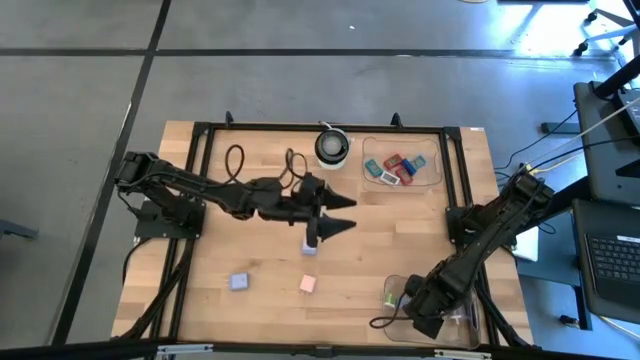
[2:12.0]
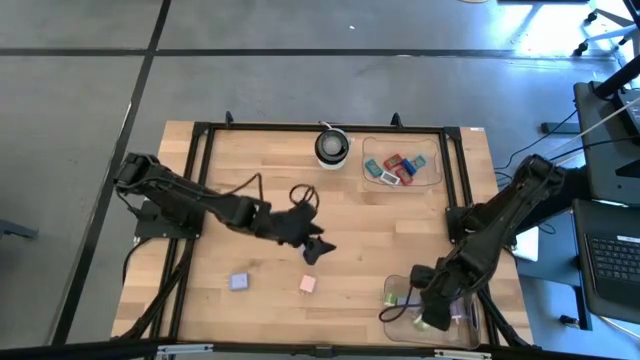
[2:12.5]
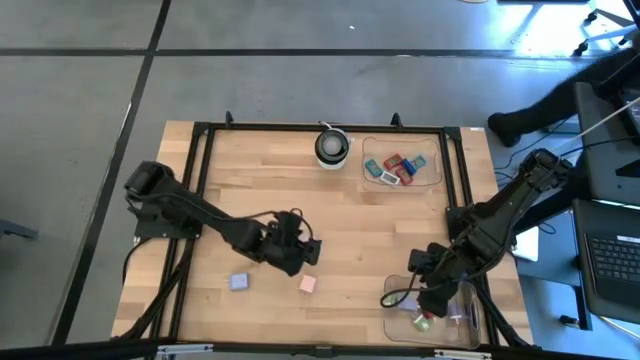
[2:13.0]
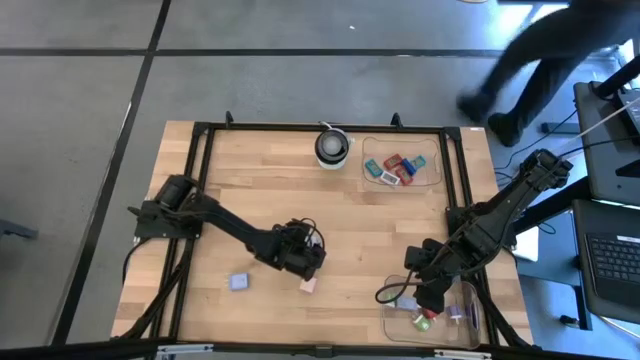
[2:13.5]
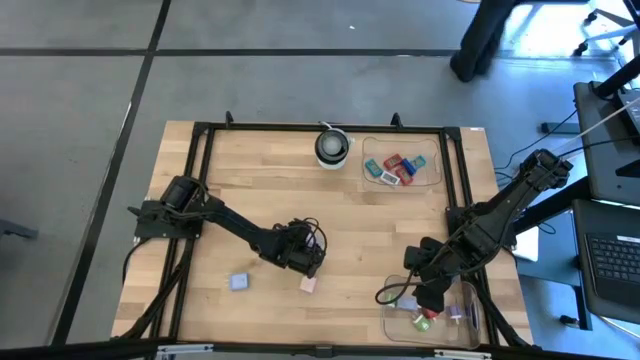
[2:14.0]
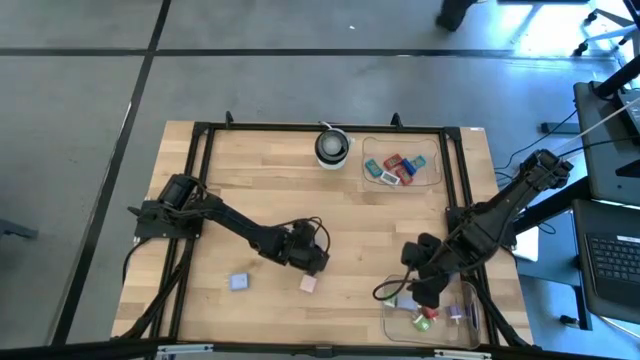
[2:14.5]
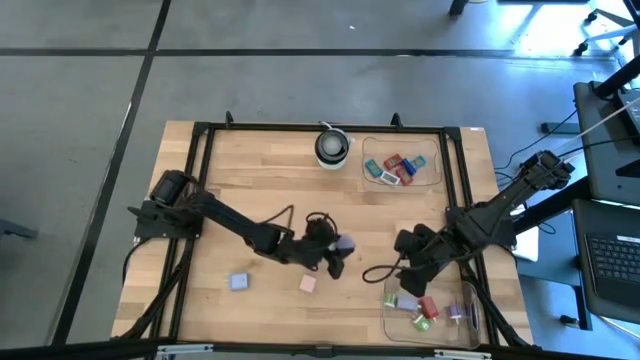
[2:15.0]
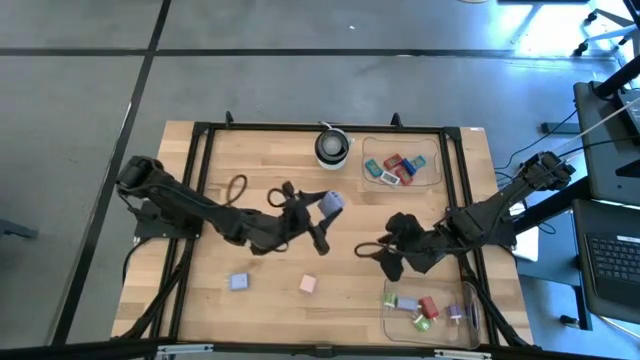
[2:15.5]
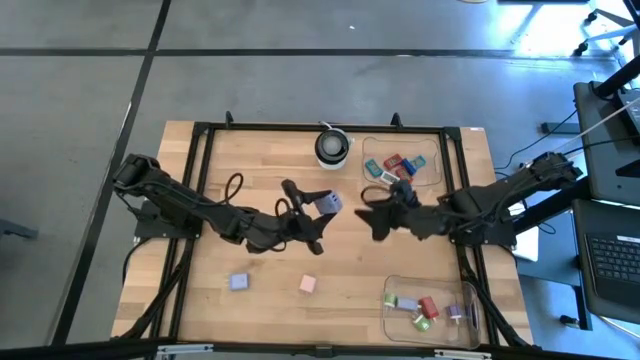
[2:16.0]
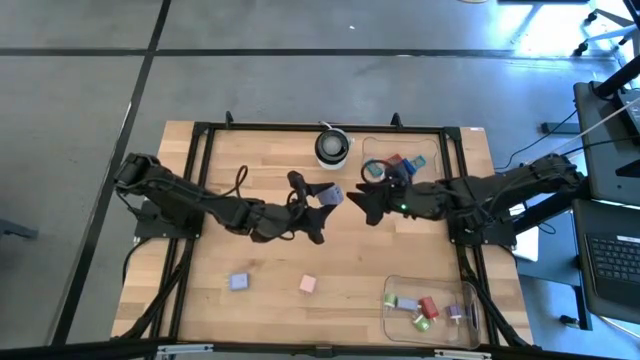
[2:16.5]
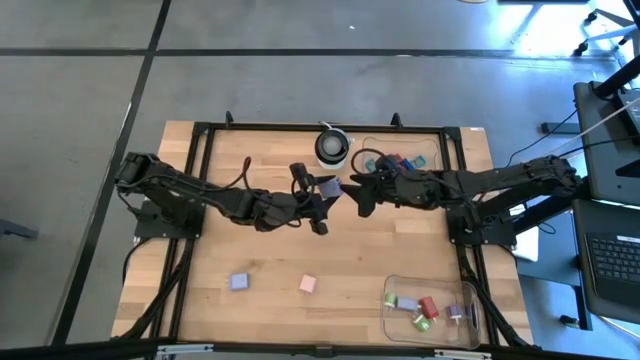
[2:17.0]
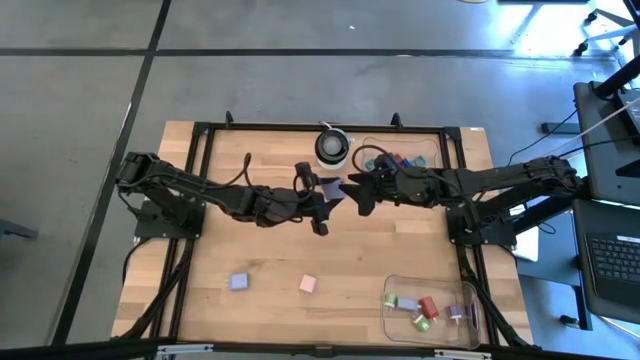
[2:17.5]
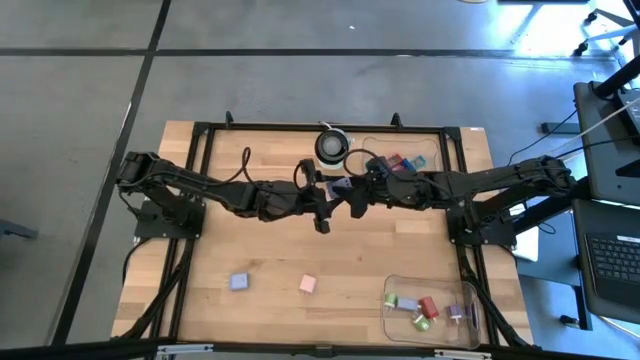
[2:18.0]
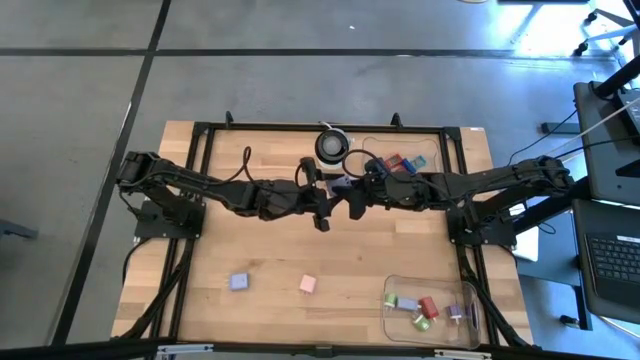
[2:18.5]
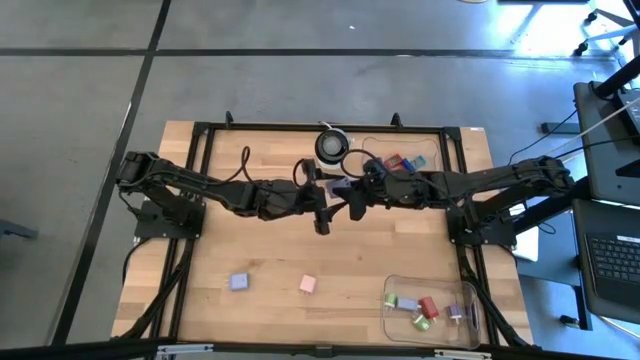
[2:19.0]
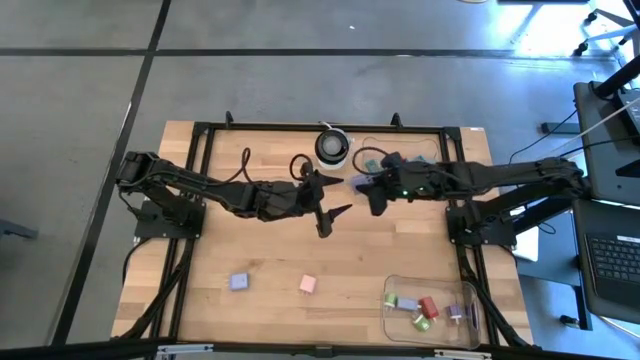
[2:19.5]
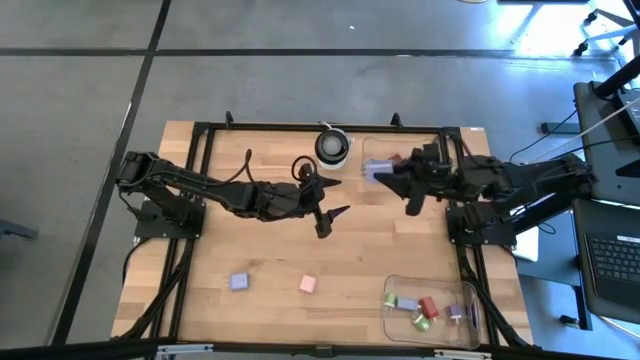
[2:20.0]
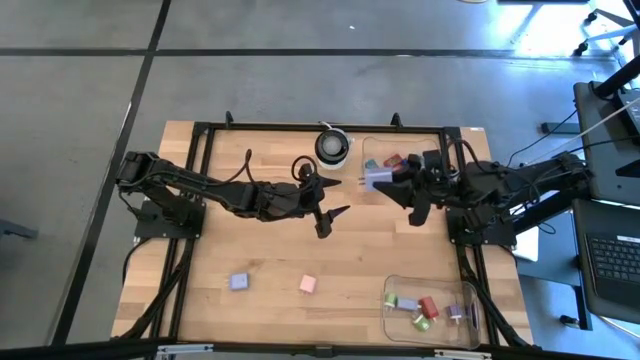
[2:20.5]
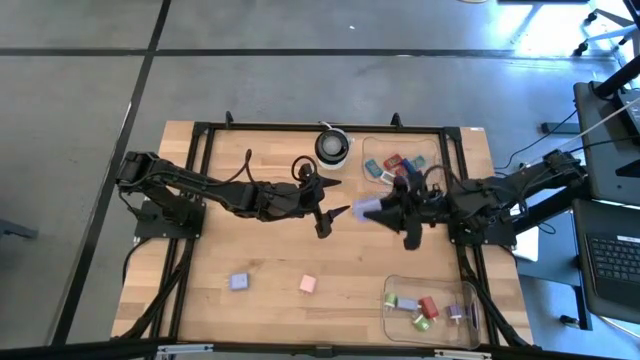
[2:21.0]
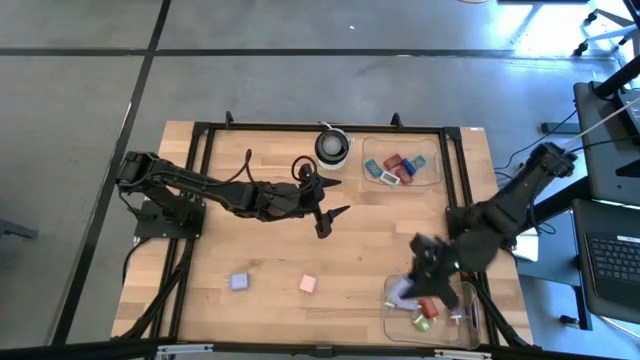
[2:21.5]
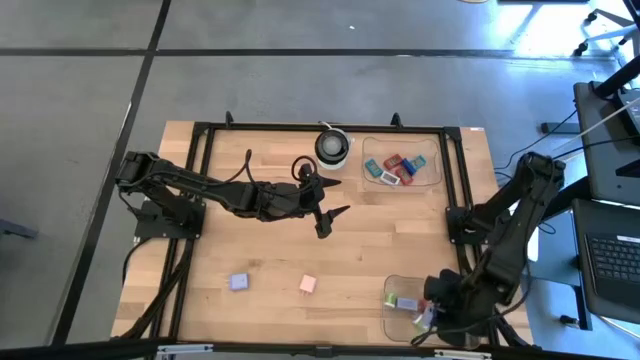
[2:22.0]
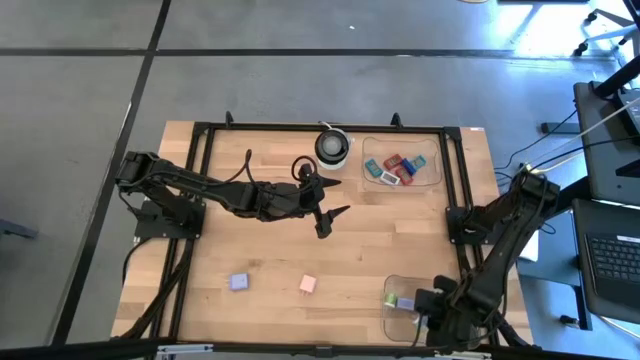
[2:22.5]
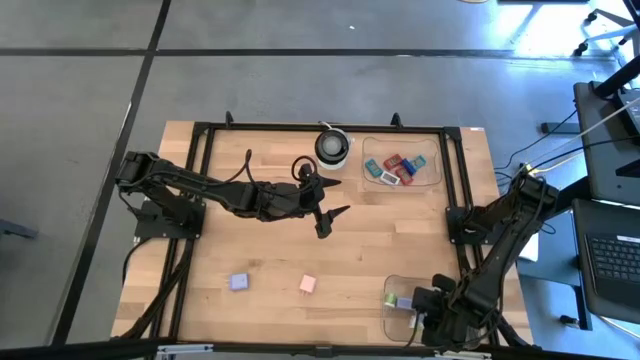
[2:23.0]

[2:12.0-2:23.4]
Task: Pick & Place Office items
Put the top light blue charger adapter into the bottom transparent bin

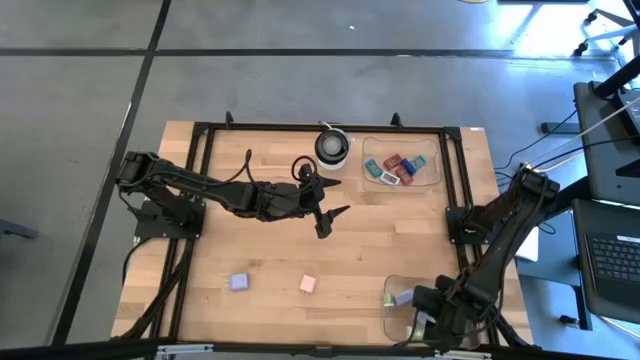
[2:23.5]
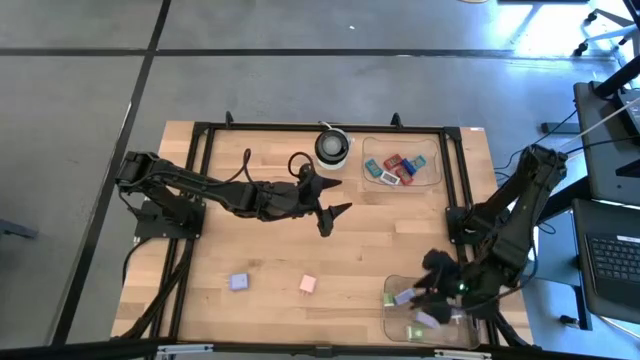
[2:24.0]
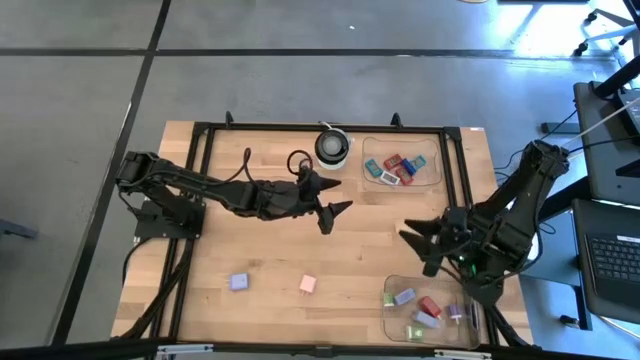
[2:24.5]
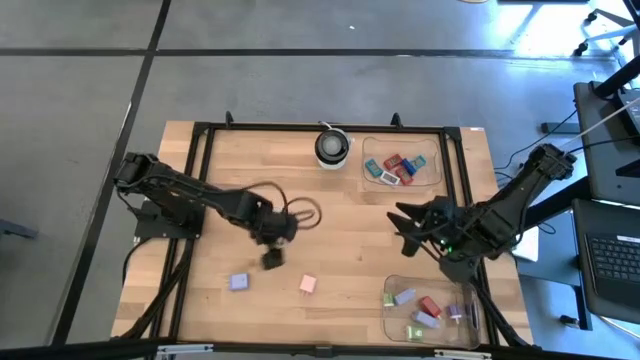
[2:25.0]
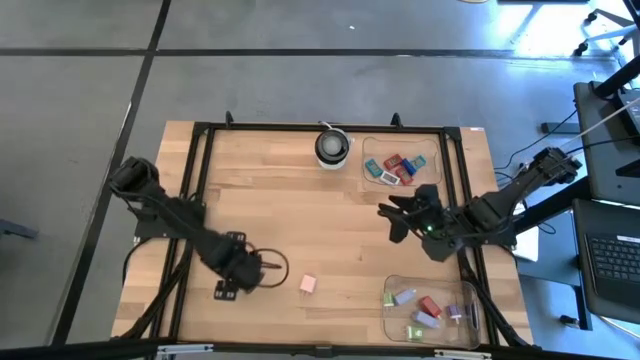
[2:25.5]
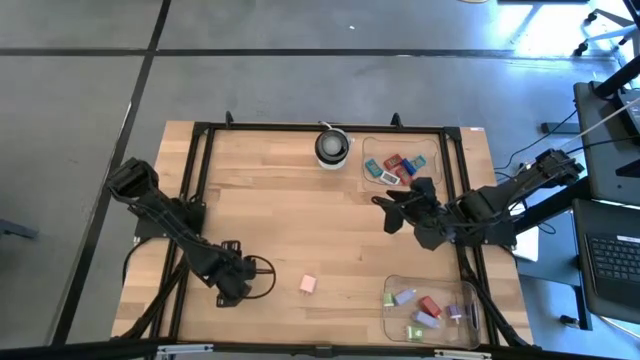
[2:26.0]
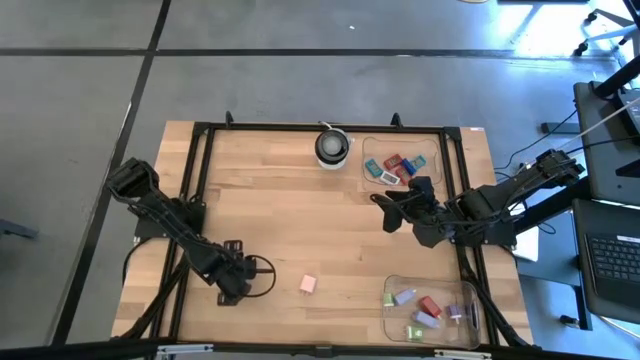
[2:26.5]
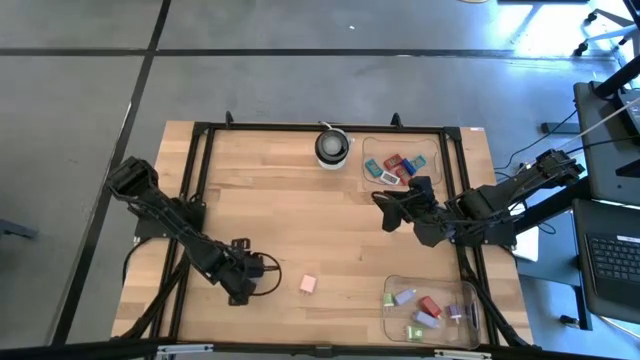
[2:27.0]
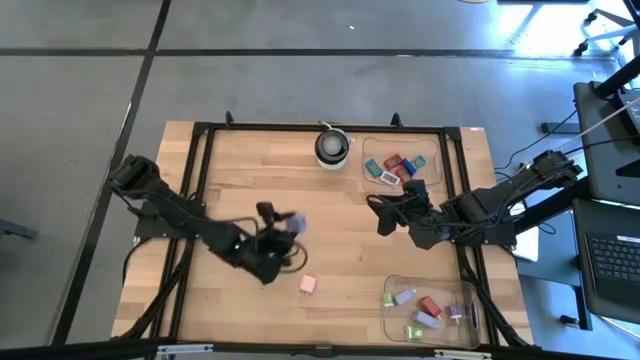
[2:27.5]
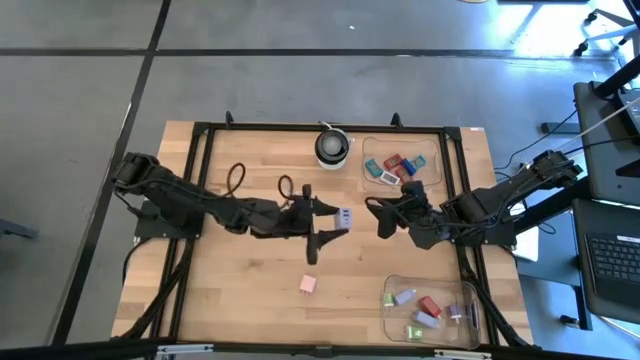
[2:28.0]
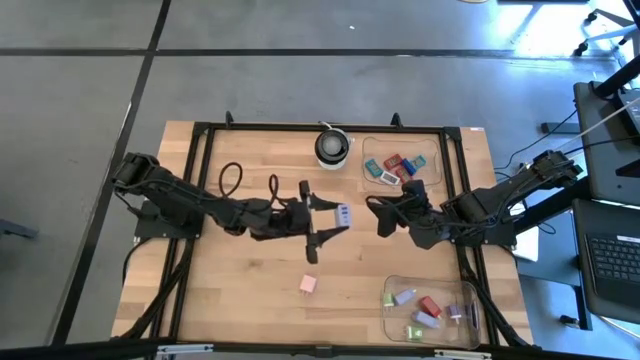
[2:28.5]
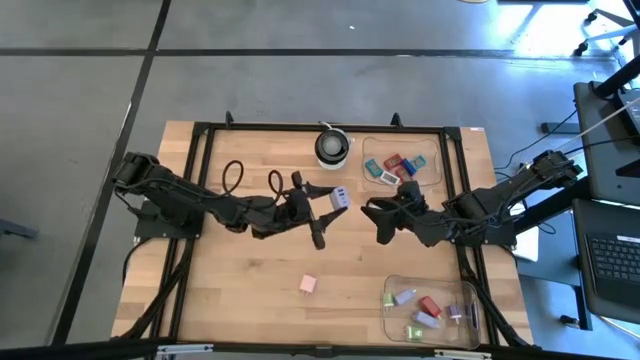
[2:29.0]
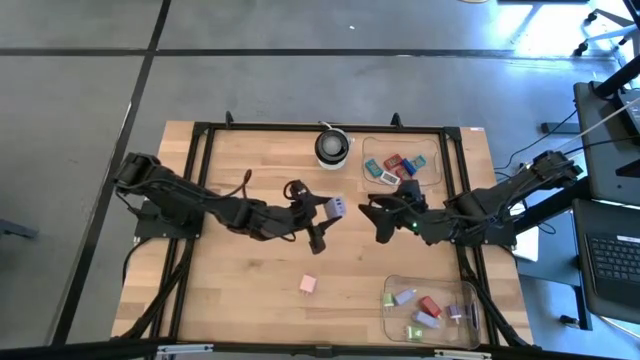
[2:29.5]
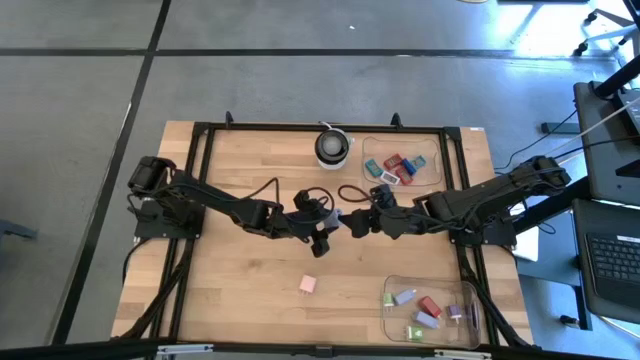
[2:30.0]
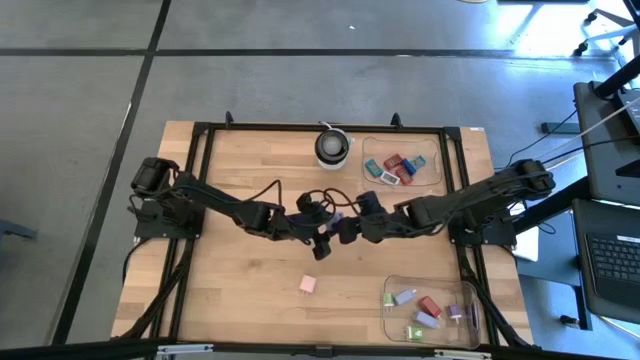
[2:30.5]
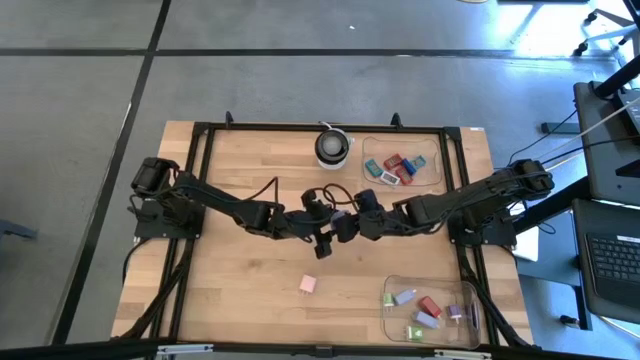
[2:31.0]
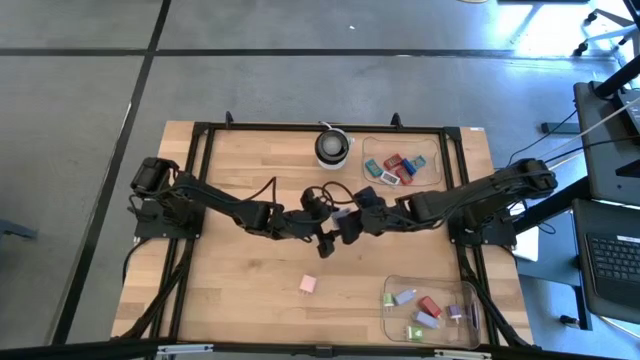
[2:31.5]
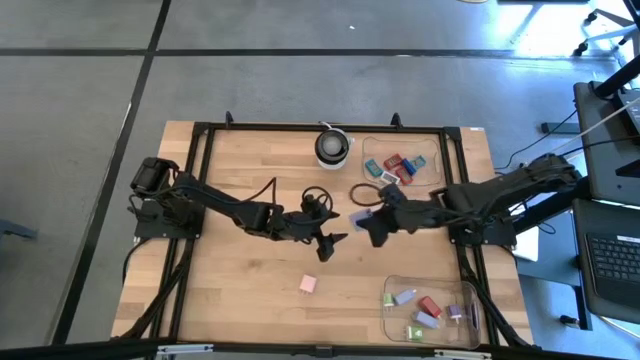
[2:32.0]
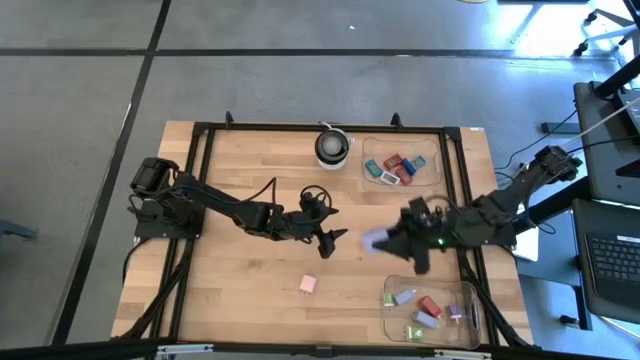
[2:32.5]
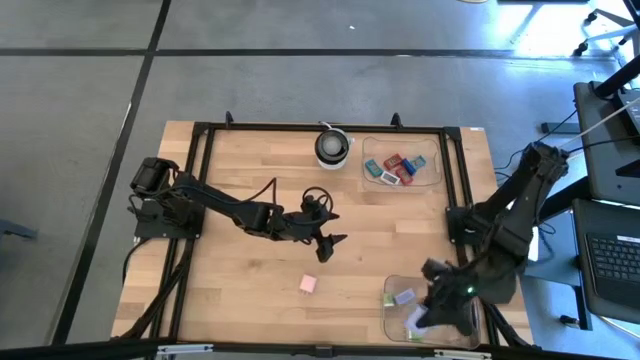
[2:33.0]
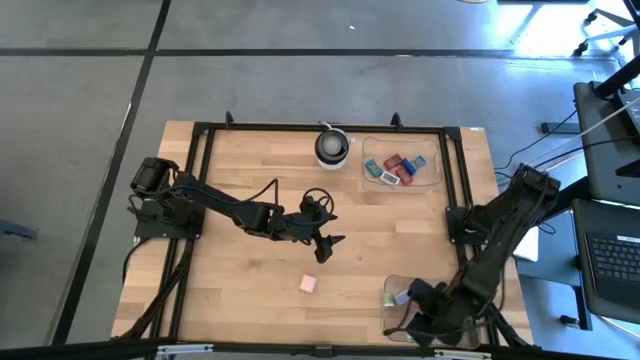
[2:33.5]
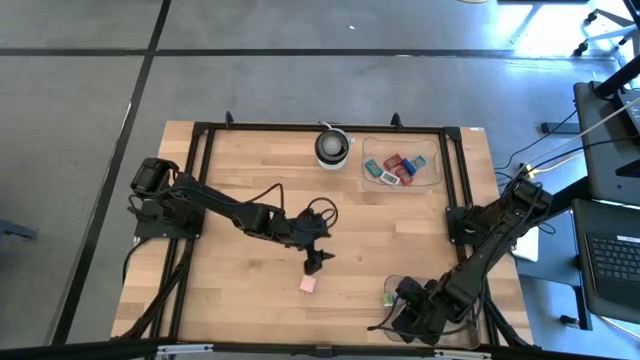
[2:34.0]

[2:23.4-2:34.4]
Put the light blue charger adapter into the bottom transparent bin

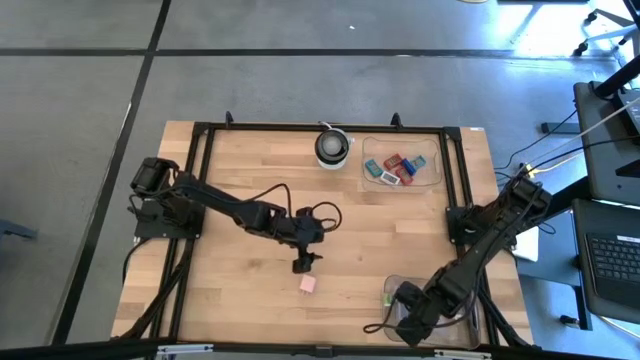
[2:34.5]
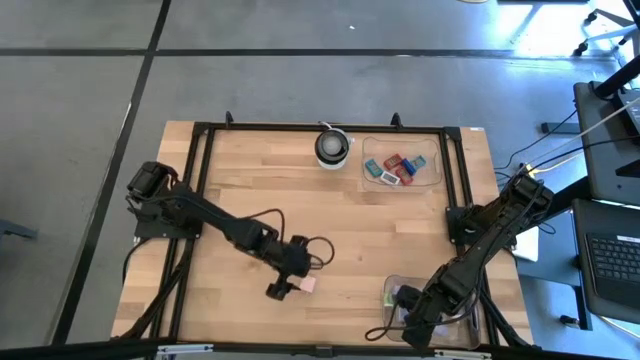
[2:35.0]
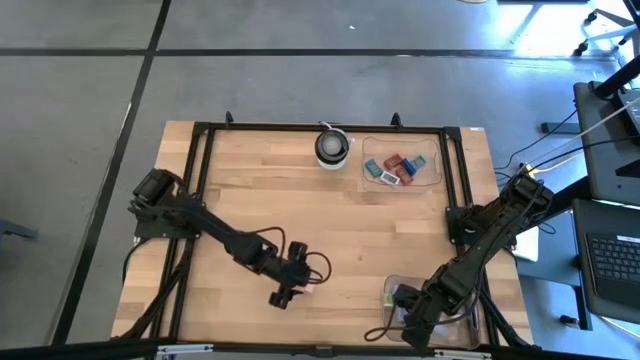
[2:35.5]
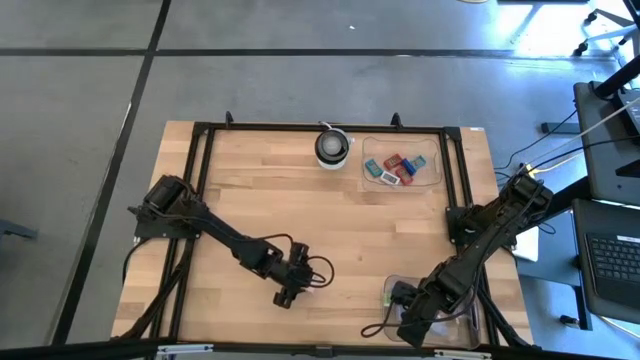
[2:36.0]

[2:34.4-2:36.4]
Put the white charger adapter into the bottom transparent bin
